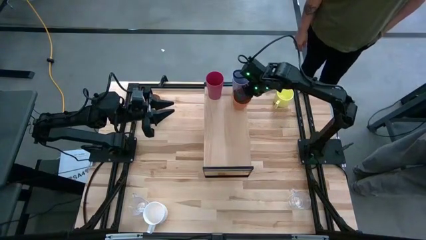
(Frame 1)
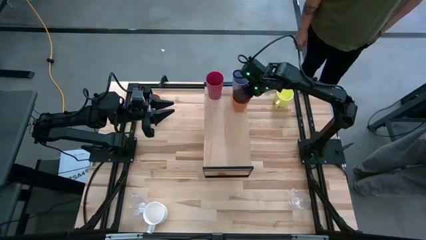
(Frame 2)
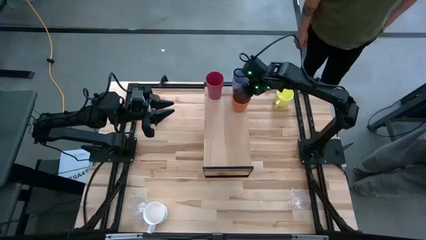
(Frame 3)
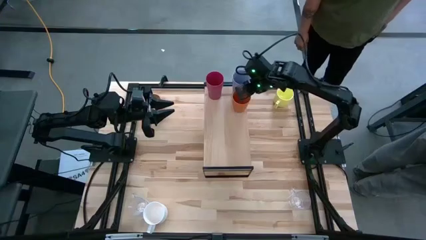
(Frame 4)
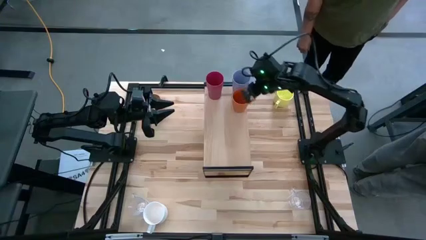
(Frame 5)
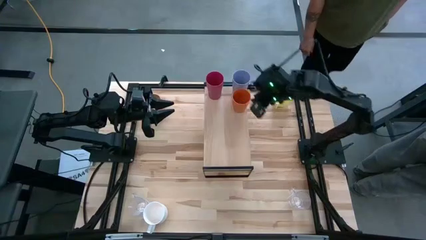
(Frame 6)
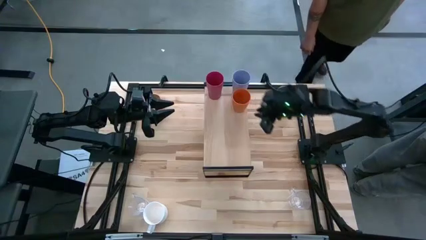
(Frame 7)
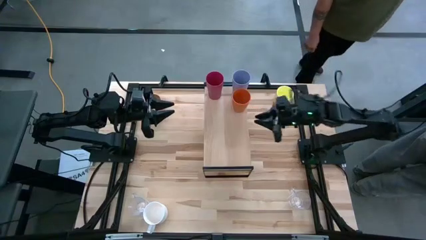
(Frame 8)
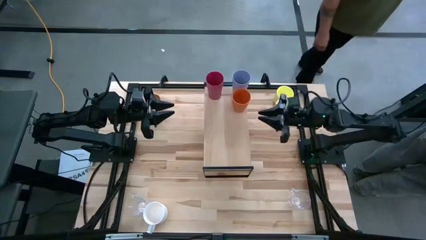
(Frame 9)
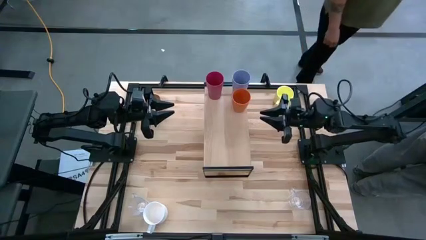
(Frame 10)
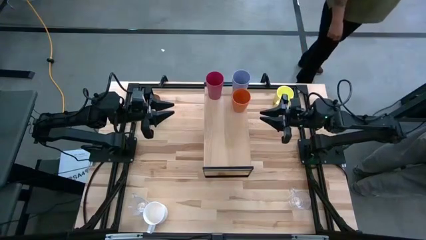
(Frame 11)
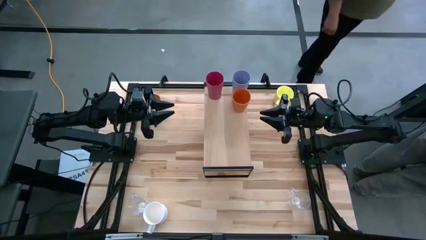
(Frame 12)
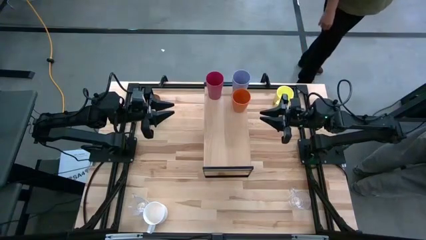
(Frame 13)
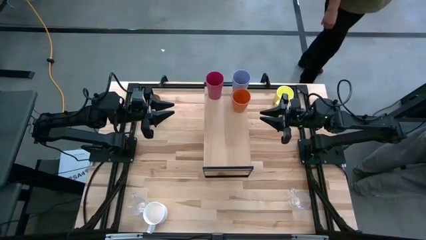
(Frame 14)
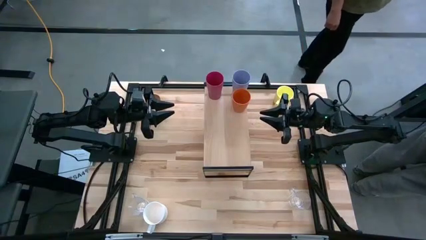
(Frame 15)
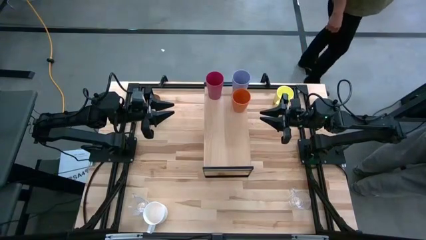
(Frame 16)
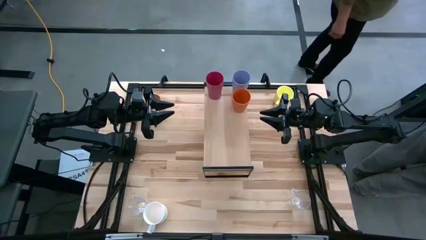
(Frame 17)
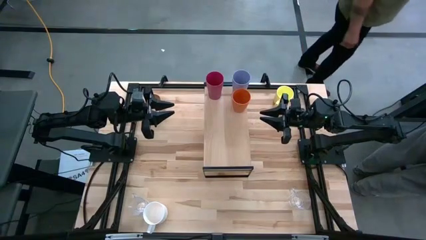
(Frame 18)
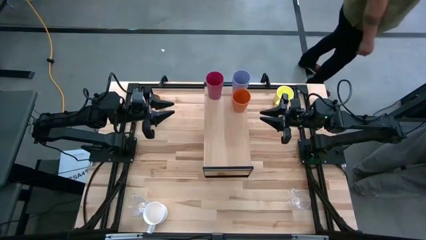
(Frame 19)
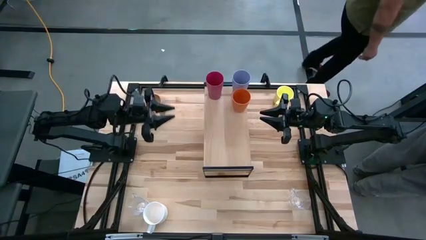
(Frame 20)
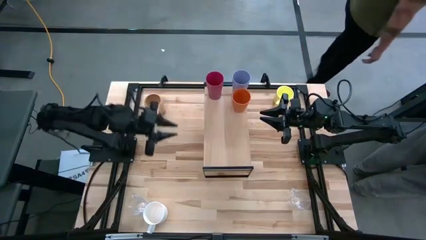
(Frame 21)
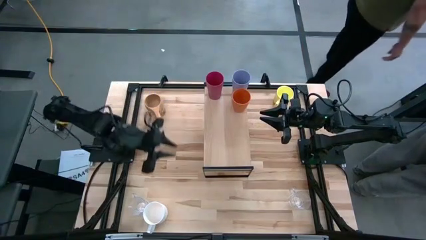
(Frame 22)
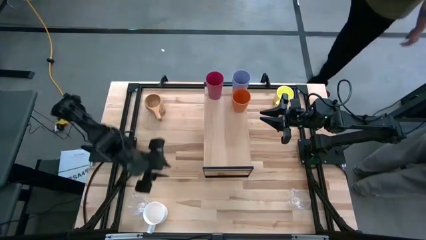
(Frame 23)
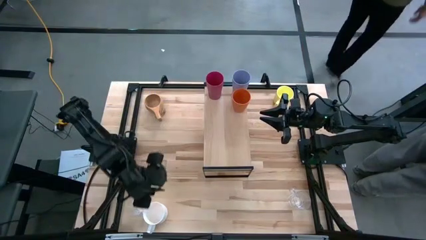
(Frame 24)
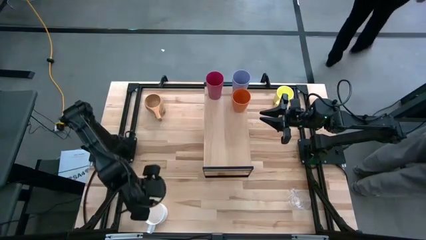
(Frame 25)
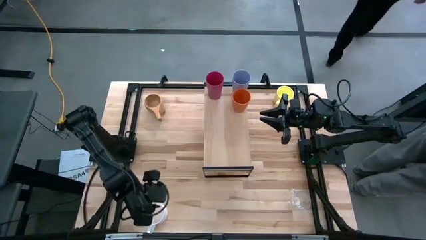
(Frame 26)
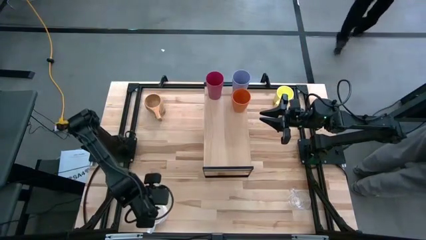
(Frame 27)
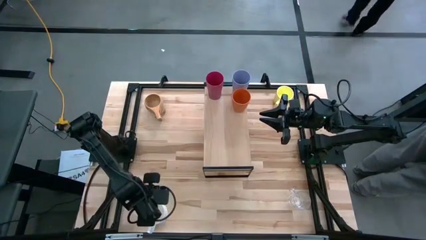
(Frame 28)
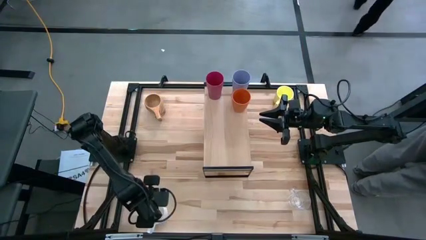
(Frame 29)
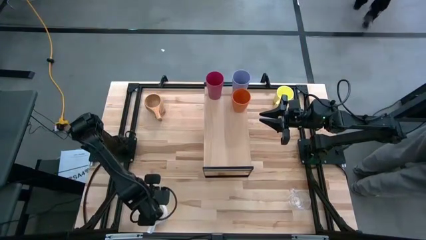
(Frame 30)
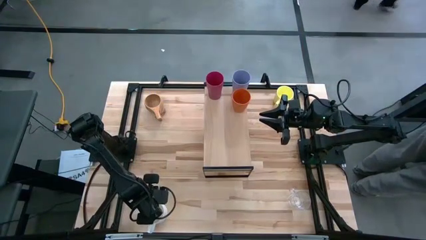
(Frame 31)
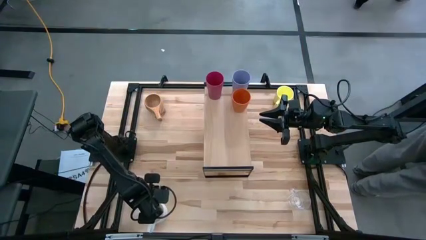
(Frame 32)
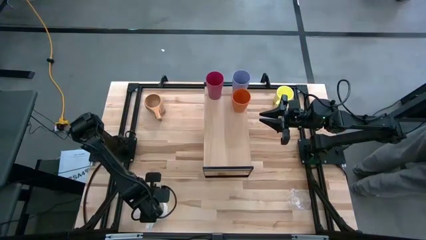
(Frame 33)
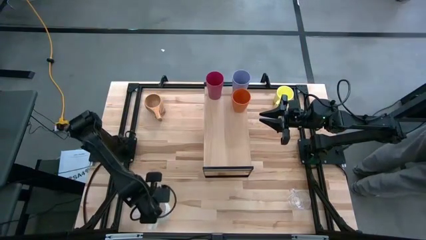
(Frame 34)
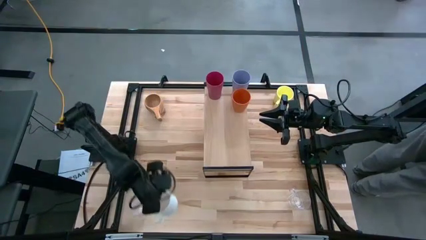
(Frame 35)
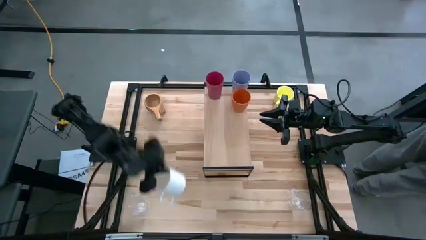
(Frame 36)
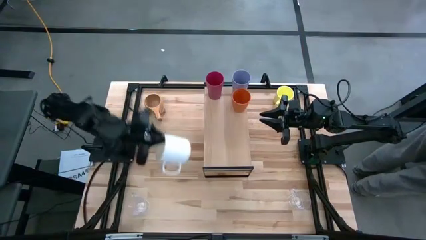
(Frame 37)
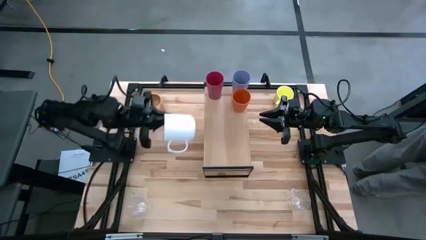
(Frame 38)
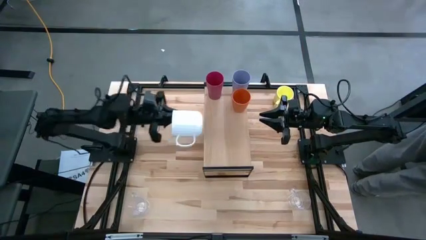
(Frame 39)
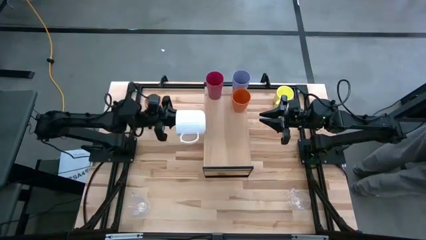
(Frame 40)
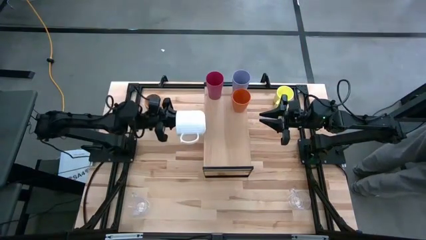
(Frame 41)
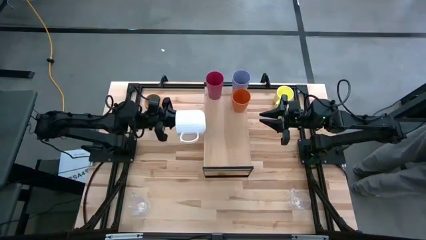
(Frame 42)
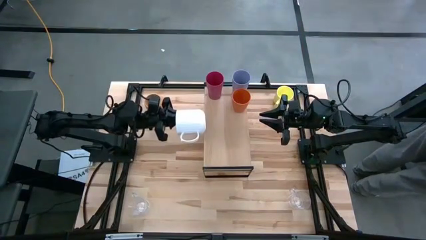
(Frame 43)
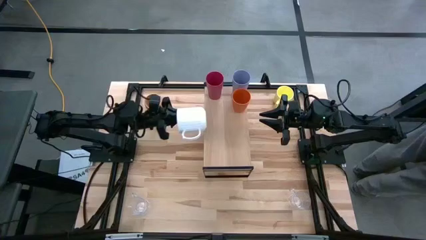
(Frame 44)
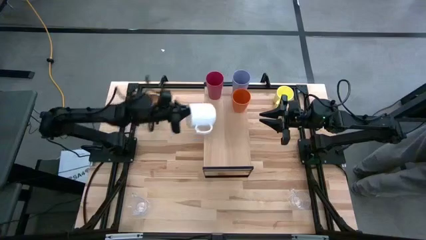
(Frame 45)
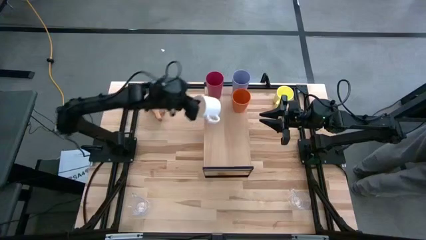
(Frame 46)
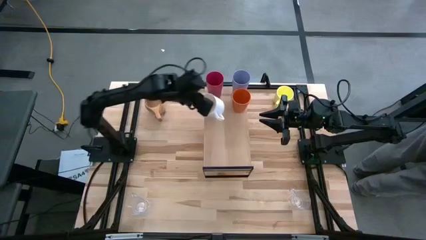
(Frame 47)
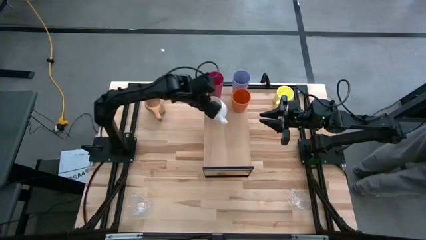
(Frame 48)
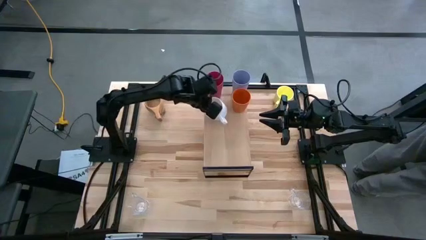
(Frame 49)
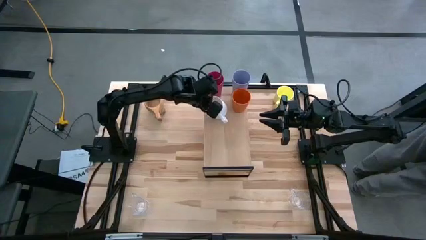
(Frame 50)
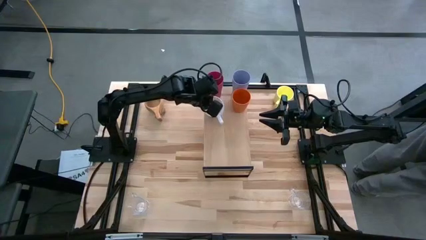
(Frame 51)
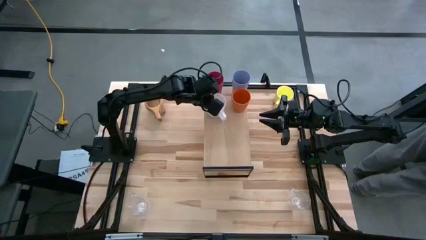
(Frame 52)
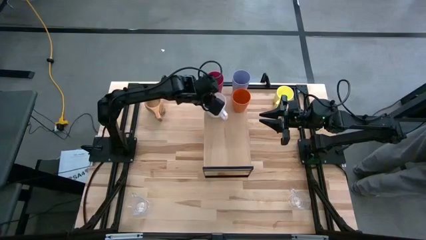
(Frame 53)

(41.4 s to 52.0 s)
Task: Stack small to large cups/mugs on shelf
Put the white cup on the shelf

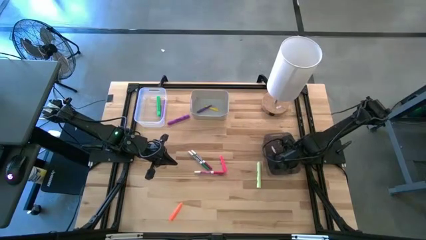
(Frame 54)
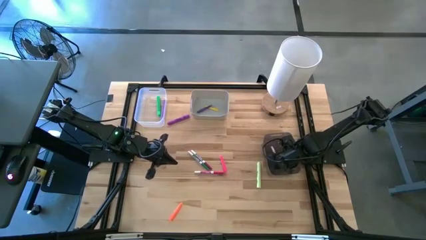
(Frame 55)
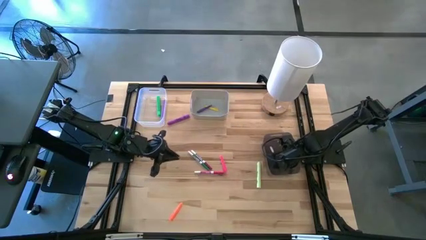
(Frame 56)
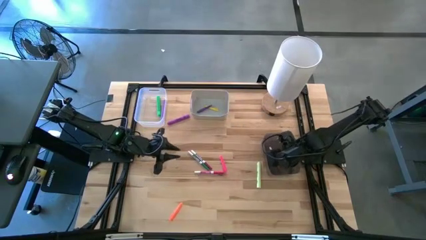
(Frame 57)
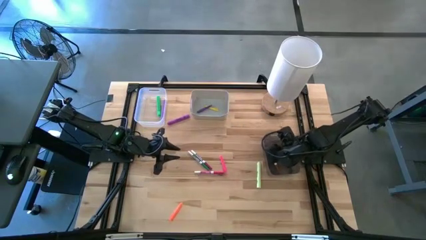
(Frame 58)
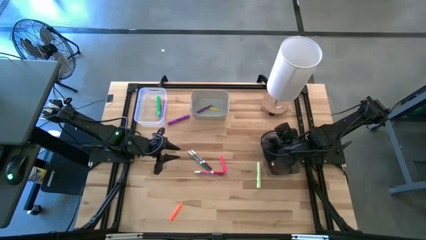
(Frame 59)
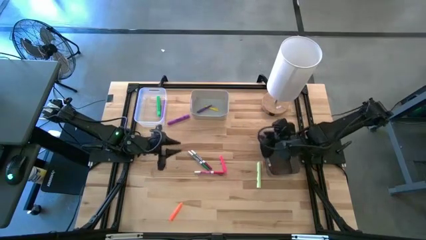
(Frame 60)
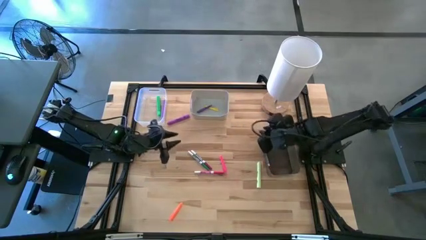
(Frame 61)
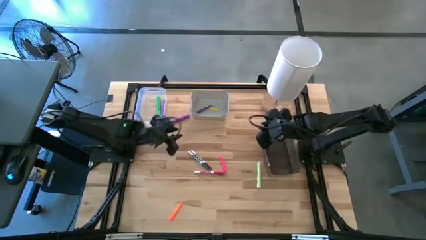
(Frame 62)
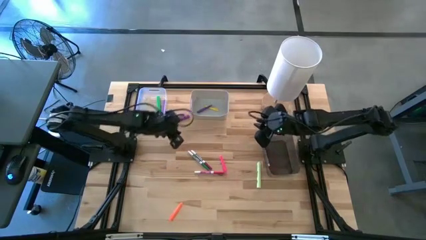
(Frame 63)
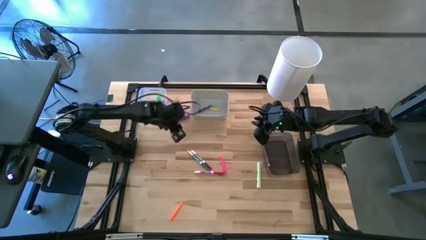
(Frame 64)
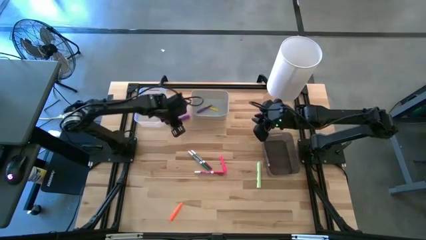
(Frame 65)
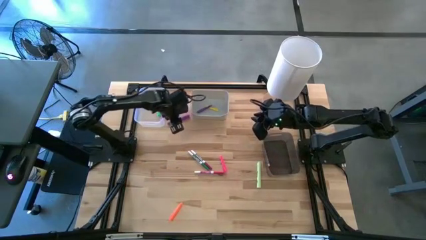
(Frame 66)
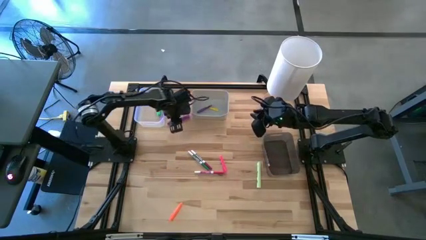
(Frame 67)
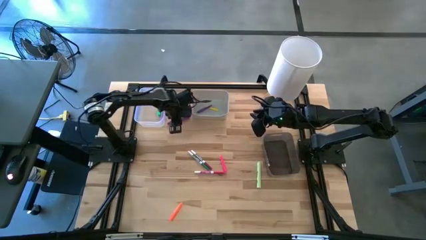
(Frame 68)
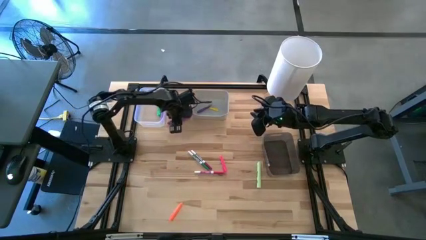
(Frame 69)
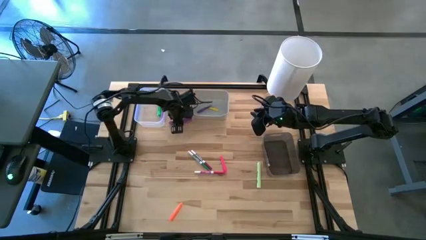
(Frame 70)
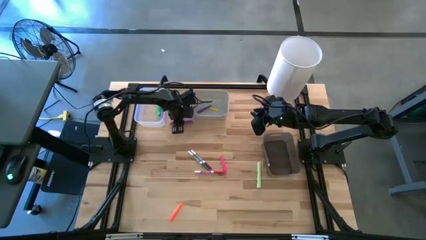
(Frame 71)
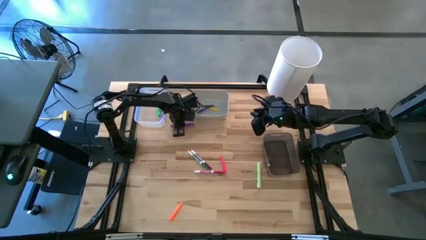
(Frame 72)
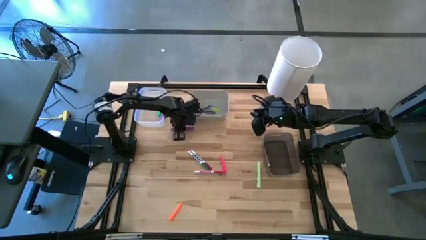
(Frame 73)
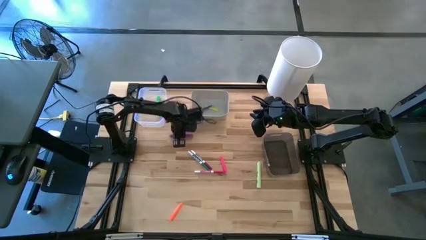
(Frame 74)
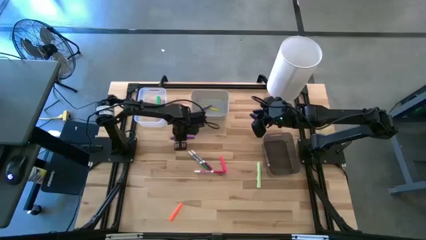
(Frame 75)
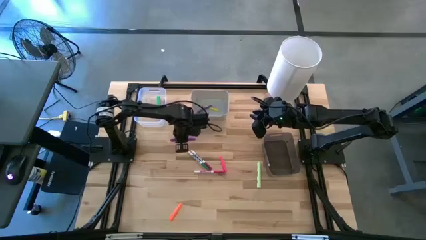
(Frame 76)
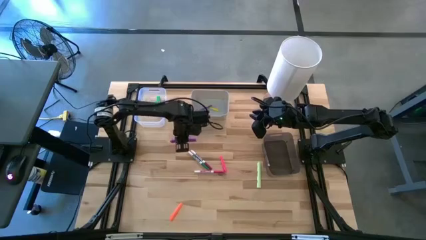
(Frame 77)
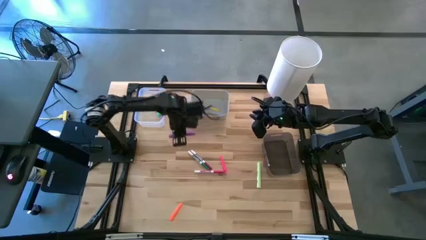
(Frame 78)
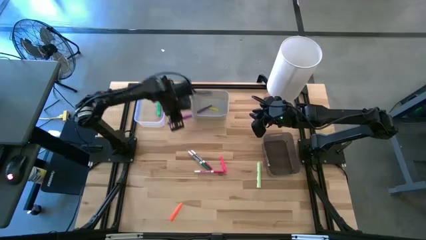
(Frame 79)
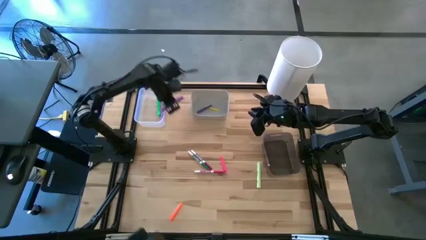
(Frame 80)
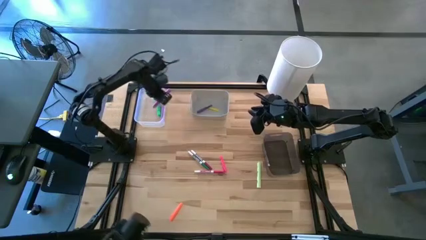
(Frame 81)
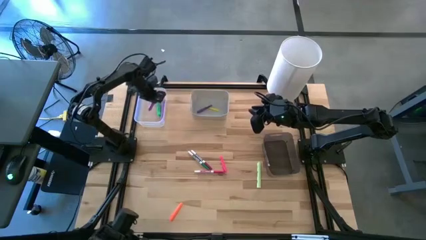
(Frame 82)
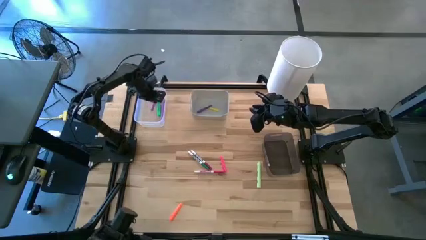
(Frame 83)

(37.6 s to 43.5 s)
Task: Pick & Place Markers
Put the purple highlighter into the transparent bin
